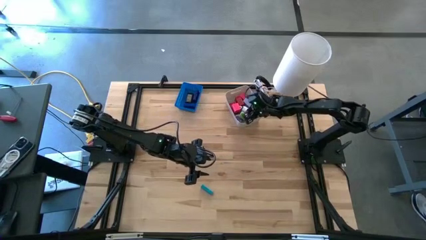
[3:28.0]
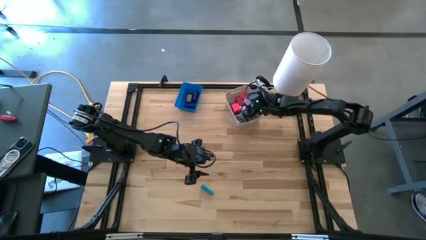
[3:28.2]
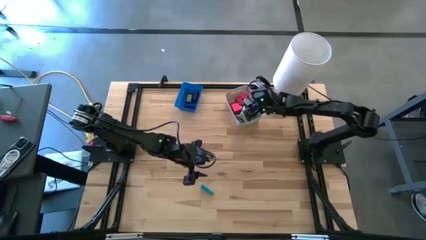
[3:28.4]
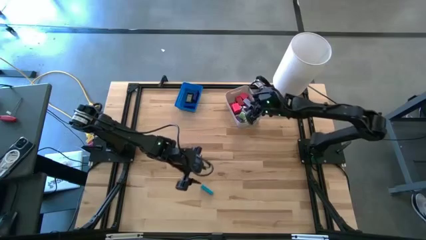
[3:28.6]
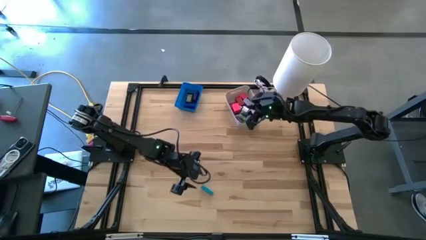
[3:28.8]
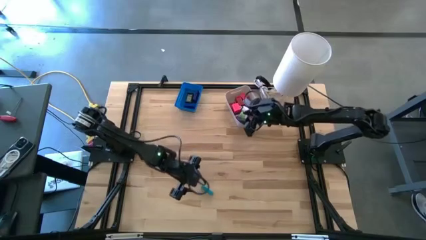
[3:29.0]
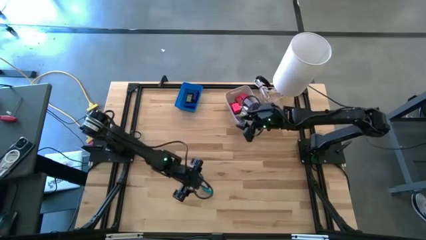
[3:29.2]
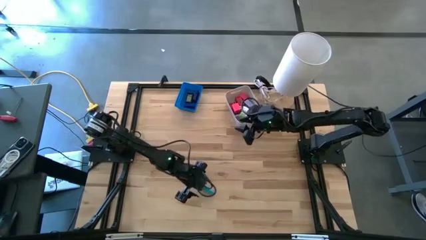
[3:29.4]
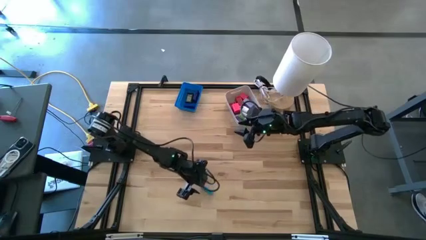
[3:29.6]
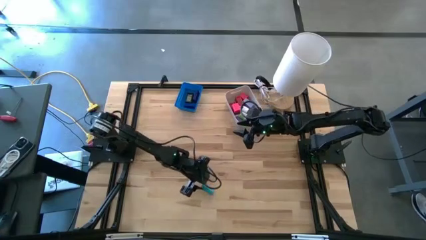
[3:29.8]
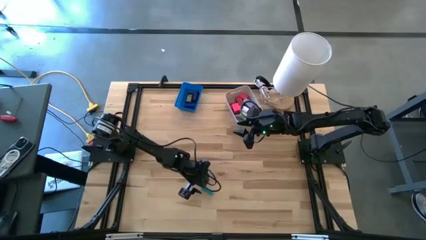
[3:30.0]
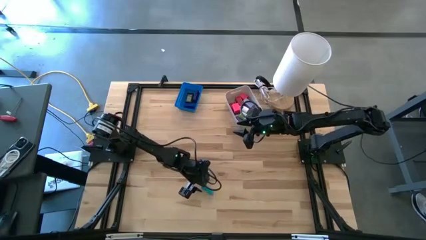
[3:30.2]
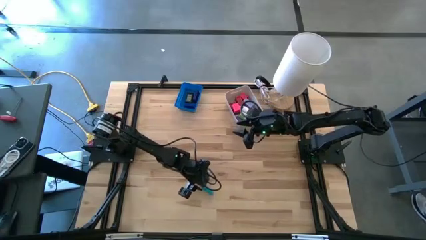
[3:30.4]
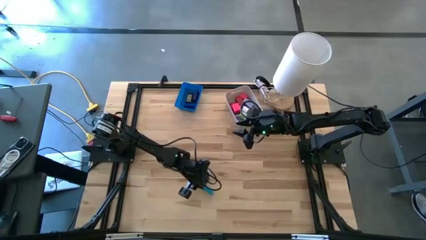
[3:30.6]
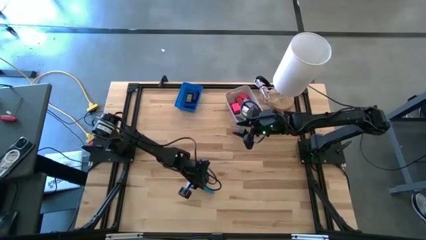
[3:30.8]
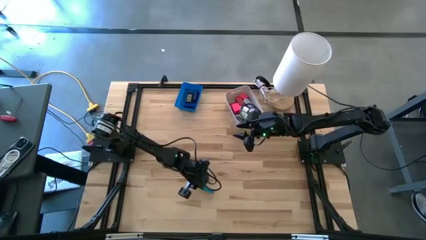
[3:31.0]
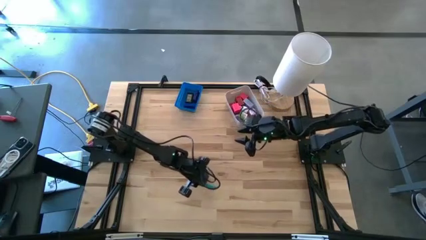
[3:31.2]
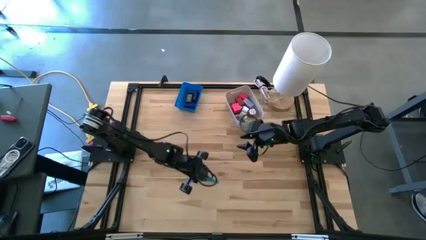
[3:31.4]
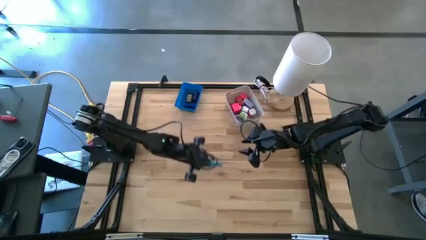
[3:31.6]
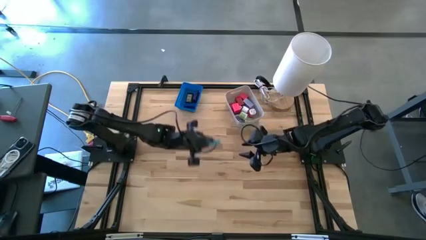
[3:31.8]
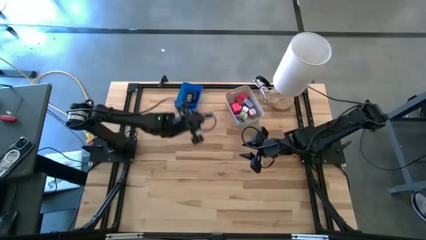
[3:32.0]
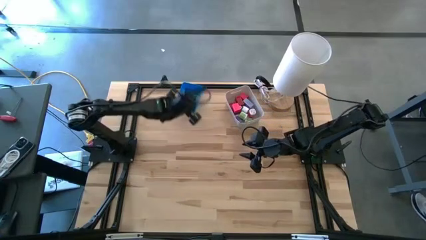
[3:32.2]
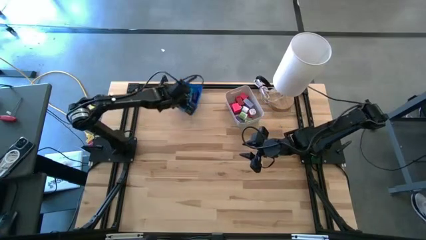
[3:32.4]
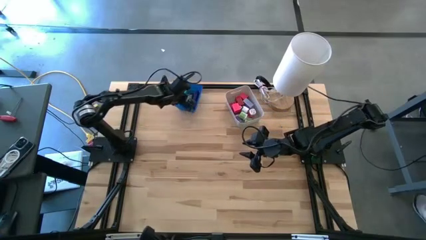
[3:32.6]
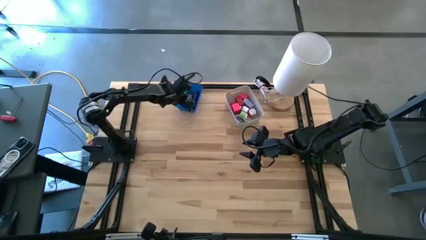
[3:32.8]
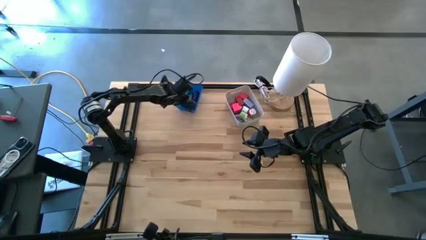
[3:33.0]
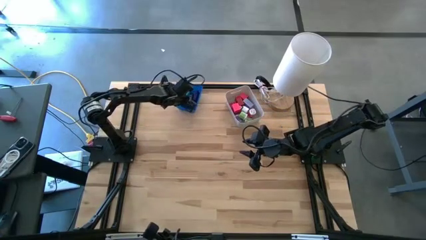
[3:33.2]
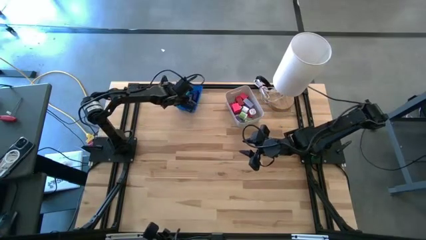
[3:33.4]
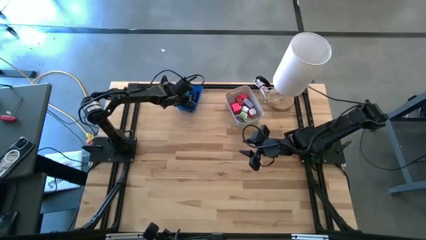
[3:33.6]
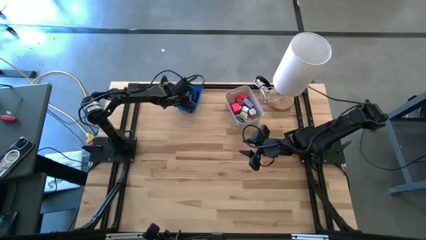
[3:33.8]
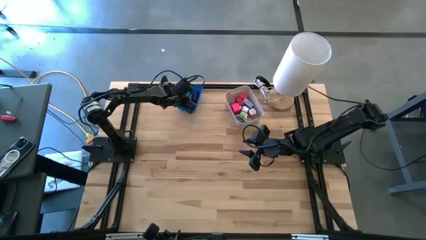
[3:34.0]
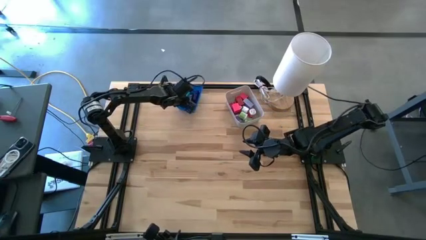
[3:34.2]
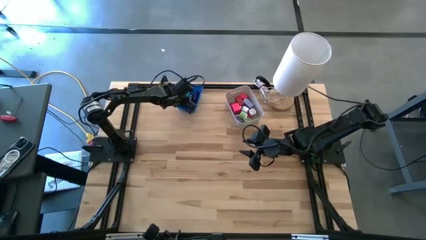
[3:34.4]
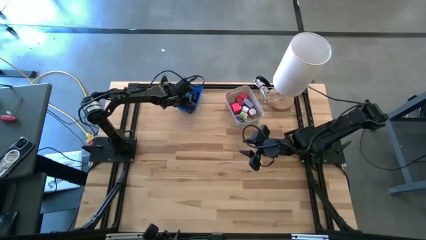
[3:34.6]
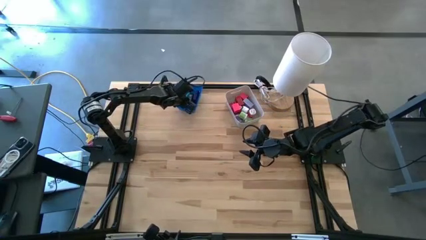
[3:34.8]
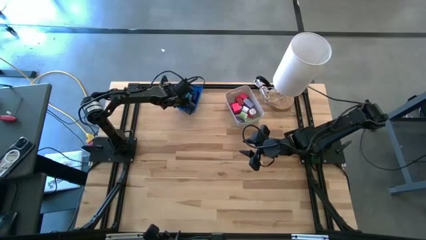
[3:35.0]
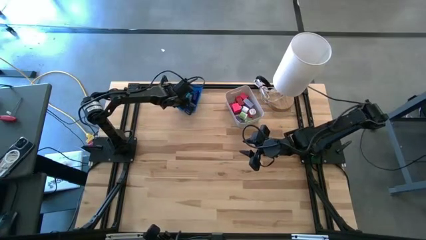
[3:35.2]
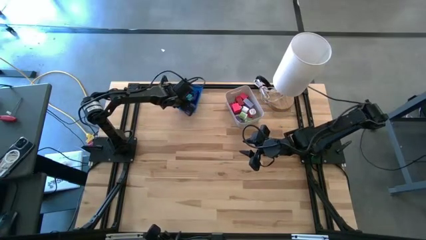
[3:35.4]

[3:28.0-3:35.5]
Task: Pick & Place Office items
Put the light blue digital timer into the blue bin

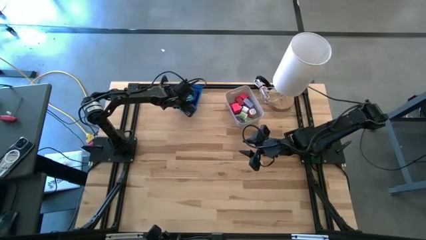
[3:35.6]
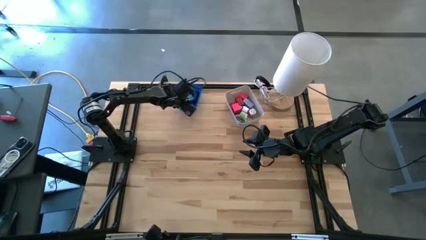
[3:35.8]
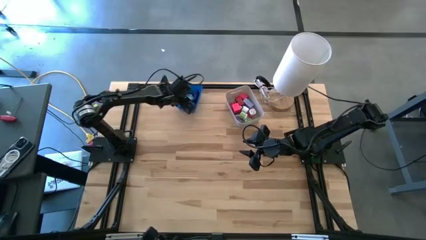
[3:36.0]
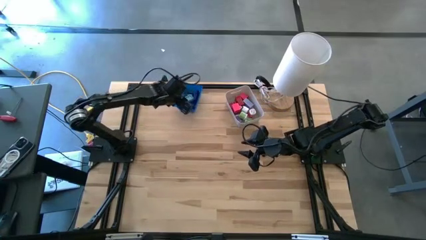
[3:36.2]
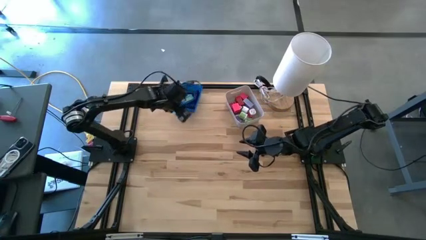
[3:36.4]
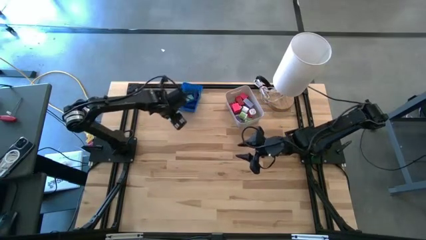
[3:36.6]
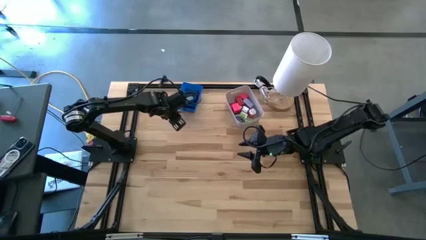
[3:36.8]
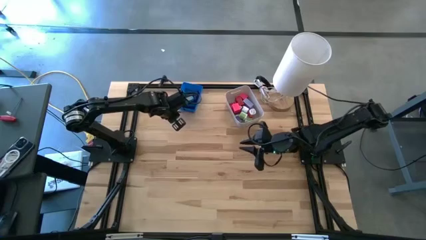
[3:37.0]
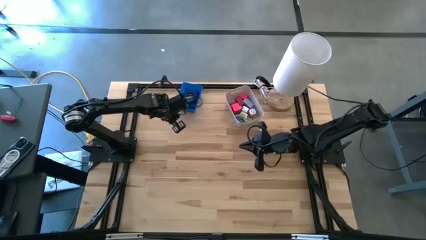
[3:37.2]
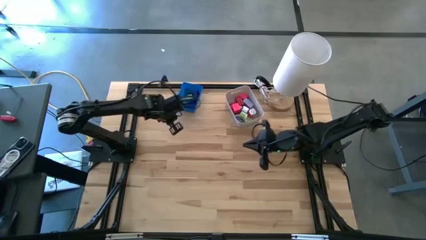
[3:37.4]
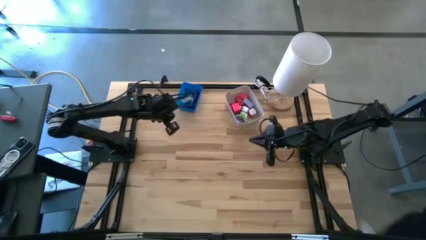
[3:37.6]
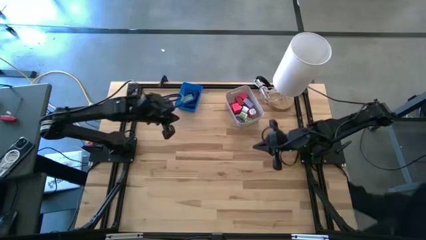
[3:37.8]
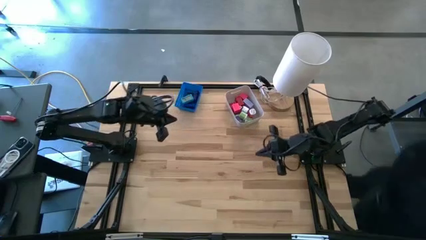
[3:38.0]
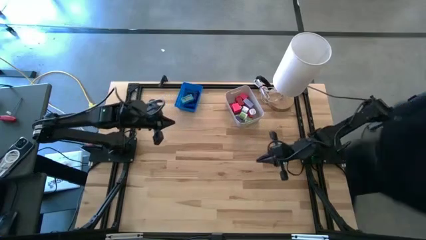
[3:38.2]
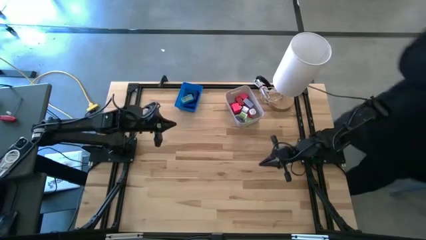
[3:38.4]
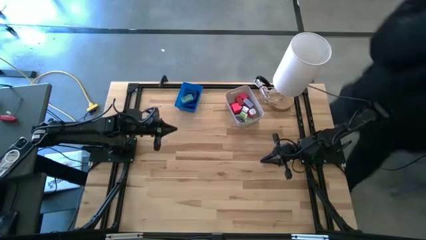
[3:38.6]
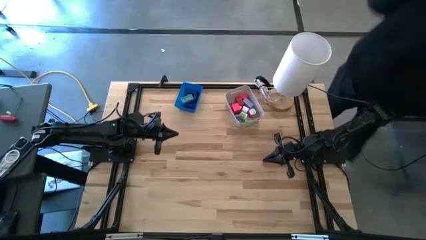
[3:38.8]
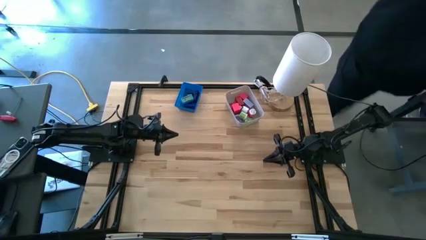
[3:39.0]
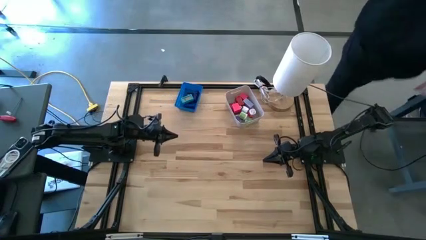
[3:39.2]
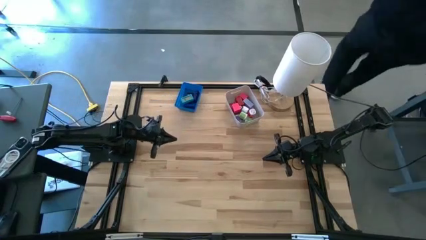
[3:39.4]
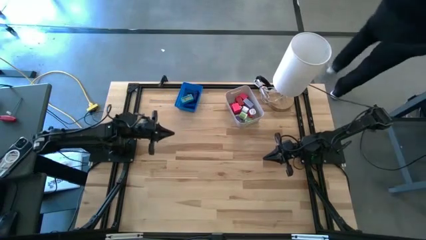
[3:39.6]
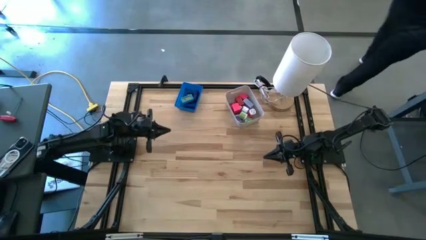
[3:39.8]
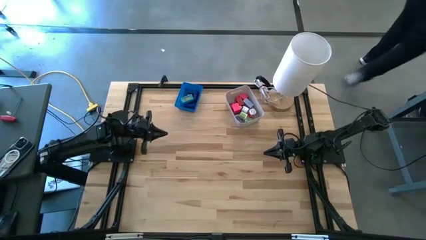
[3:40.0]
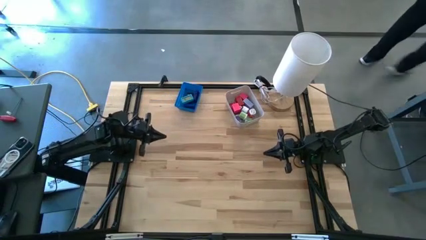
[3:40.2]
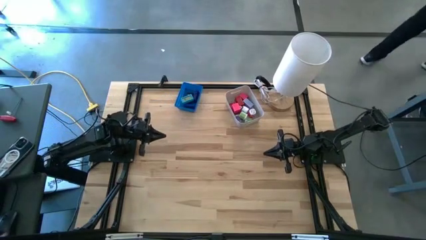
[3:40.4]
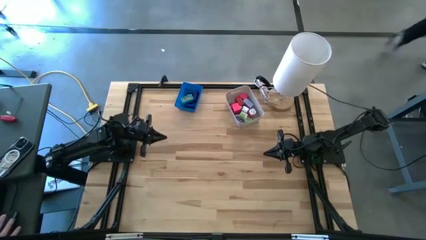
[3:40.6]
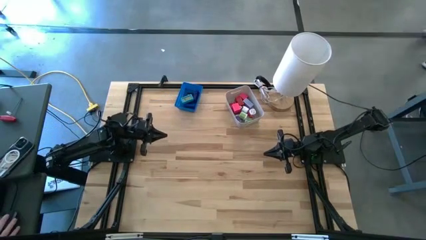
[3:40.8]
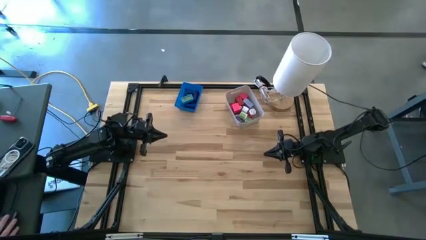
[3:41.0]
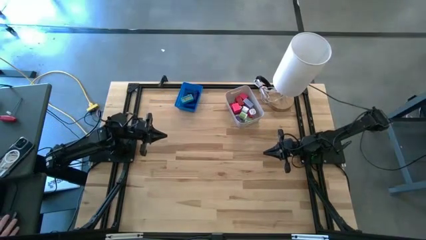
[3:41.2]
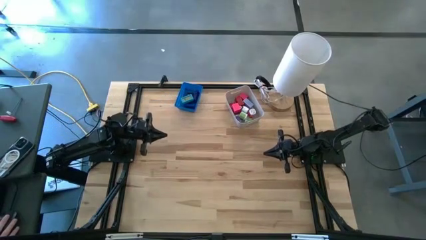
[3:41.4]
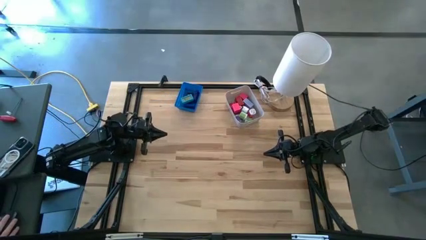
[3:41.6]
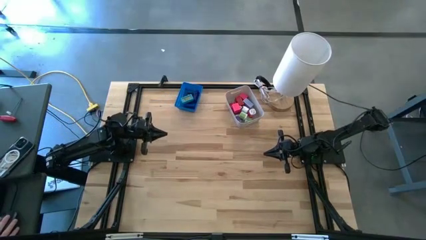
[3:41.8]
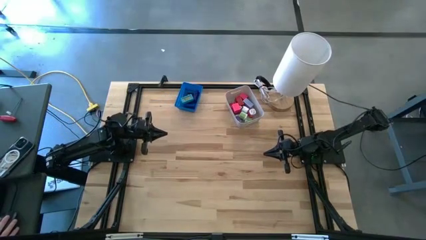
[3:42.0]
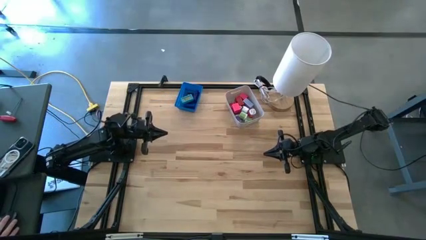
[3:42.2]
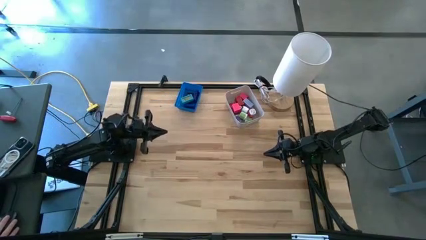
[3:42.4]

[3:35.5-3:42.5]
Return to Home Position
